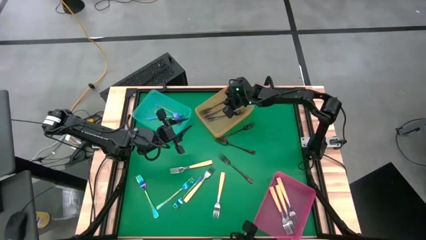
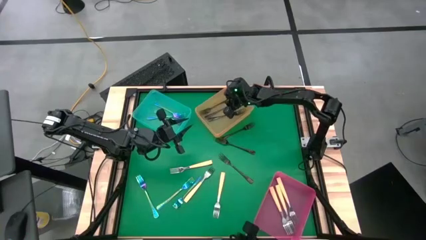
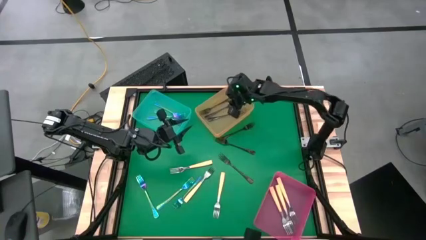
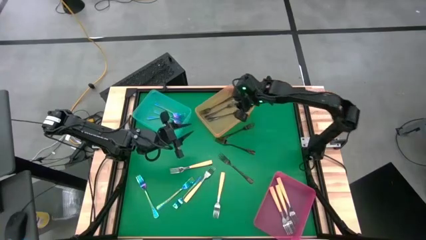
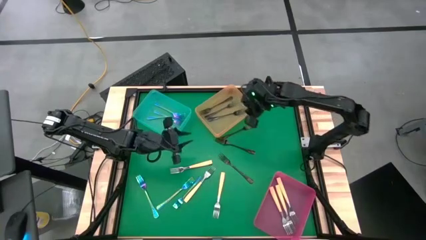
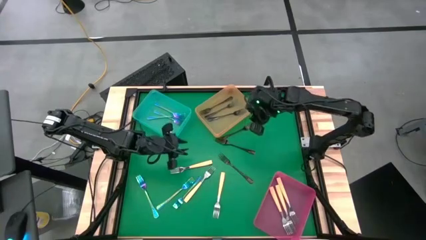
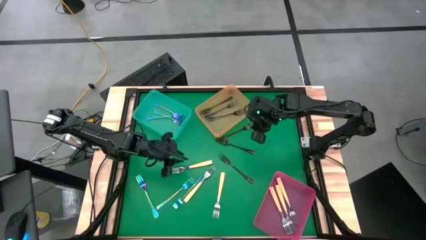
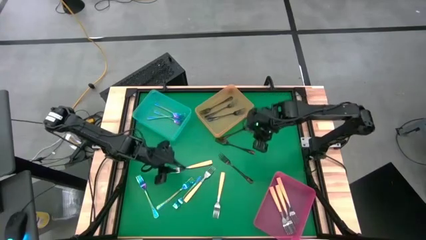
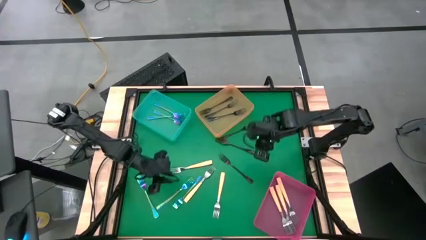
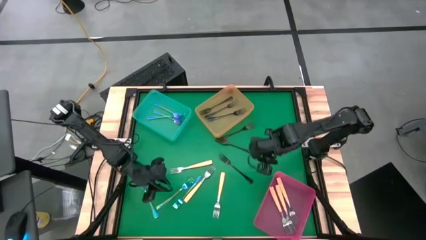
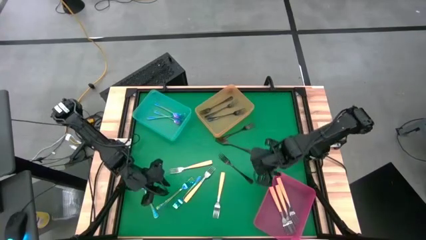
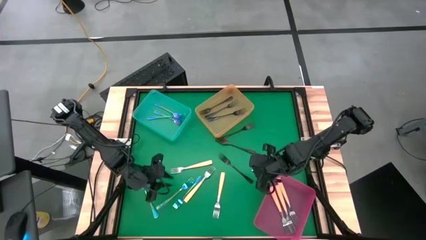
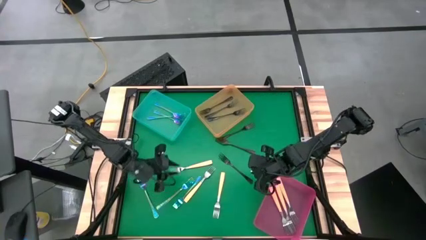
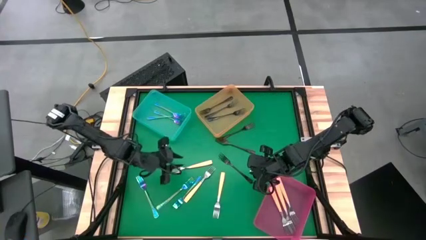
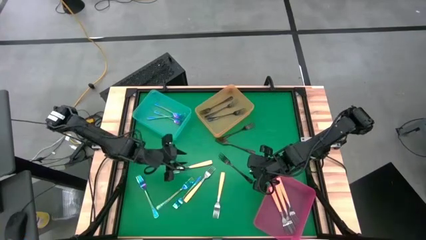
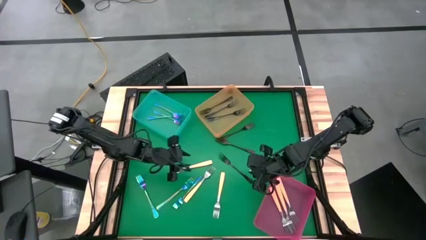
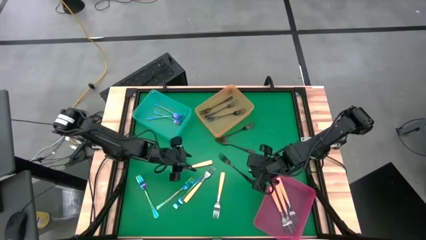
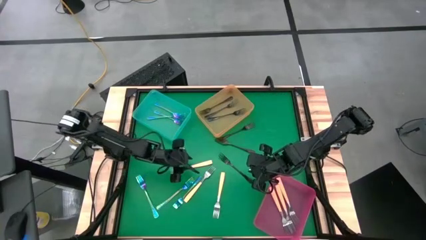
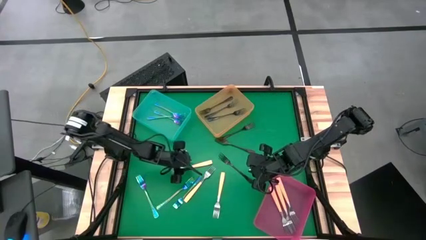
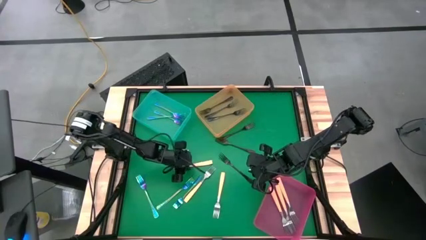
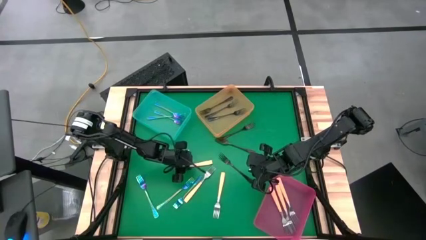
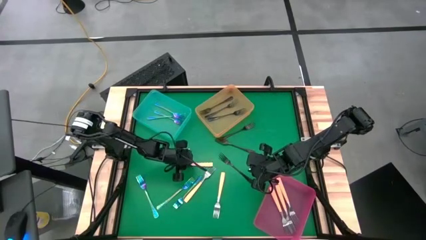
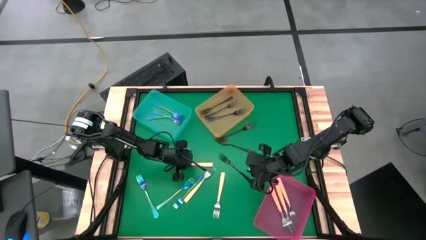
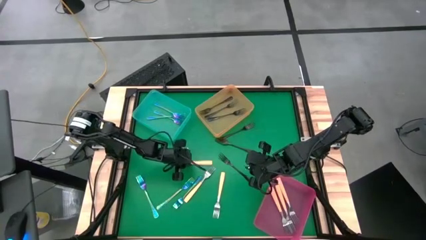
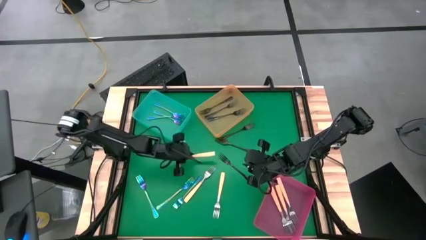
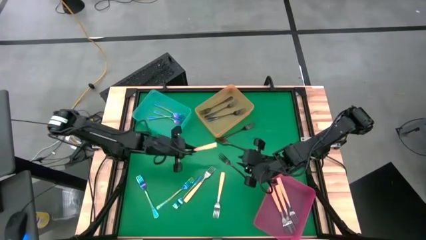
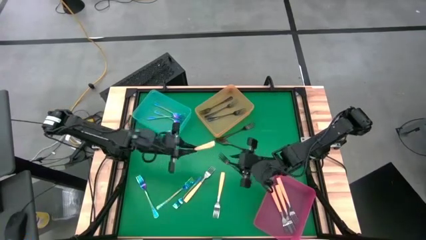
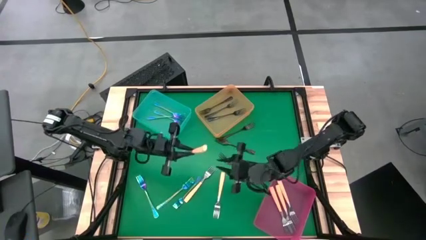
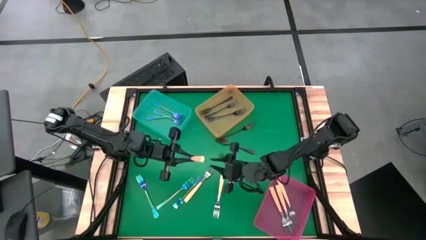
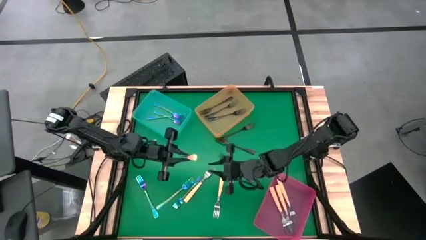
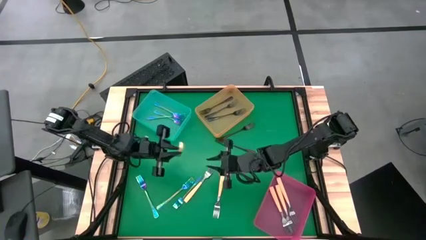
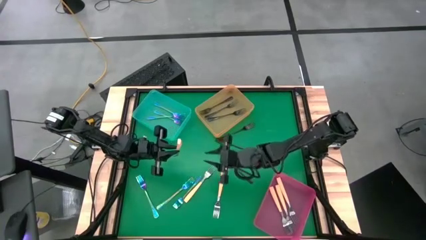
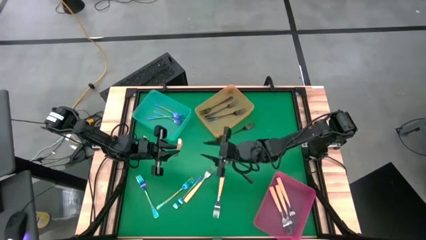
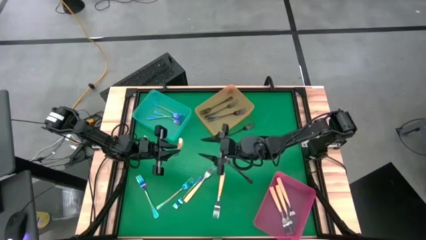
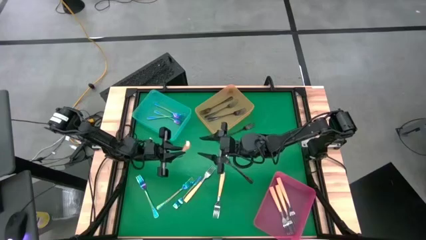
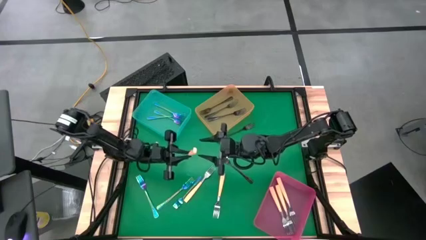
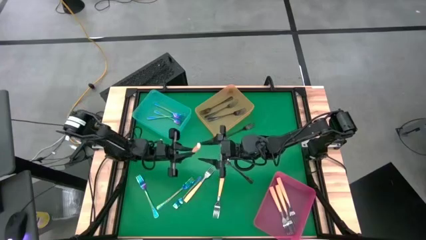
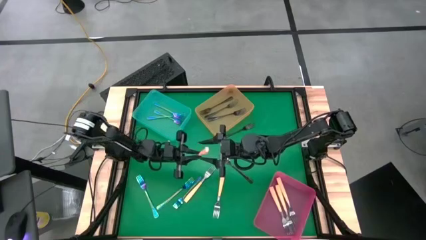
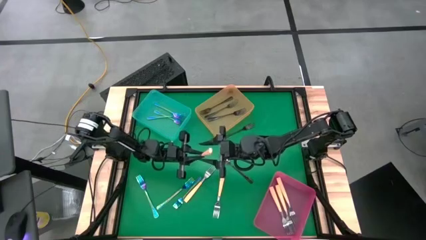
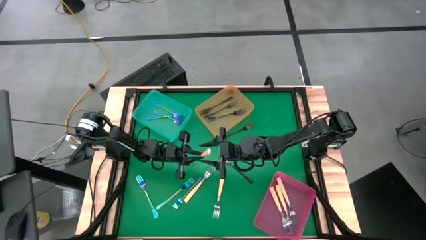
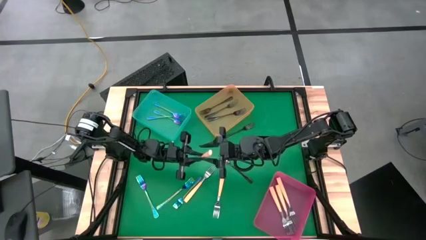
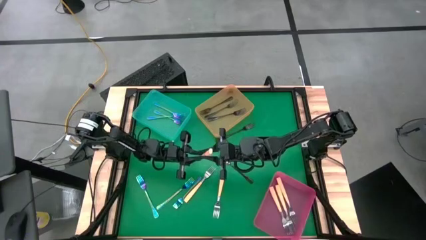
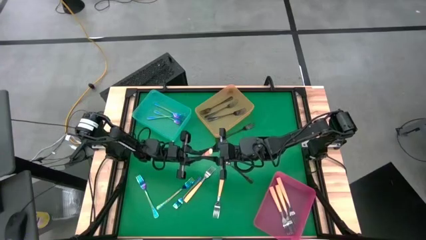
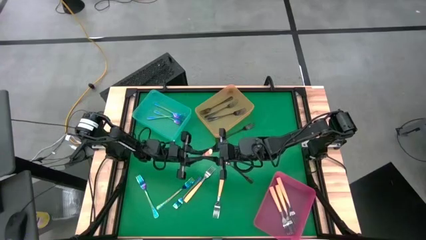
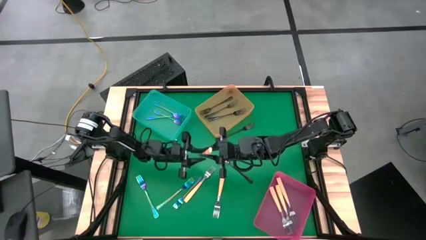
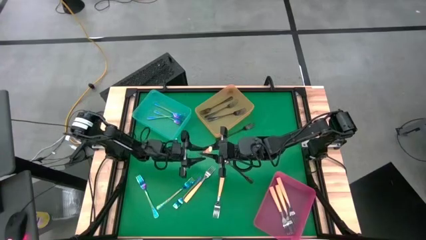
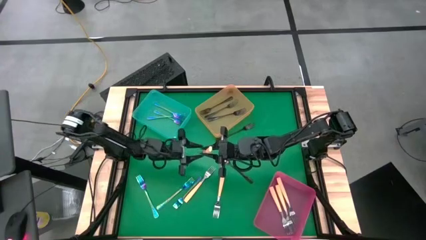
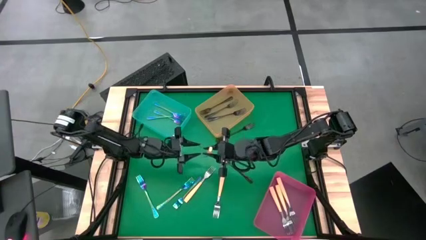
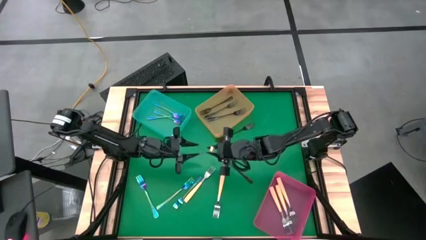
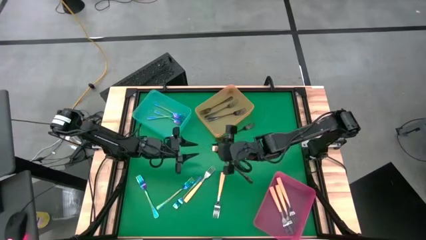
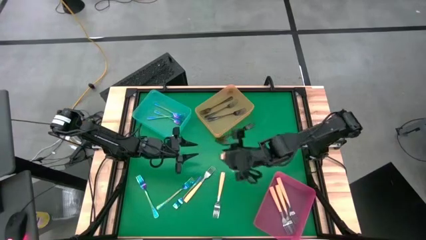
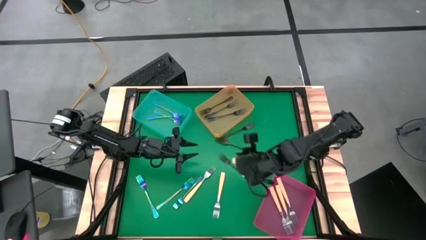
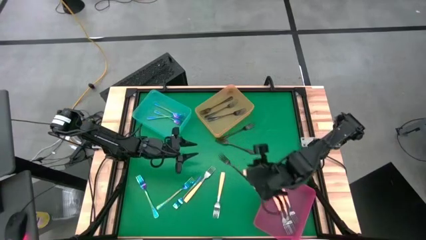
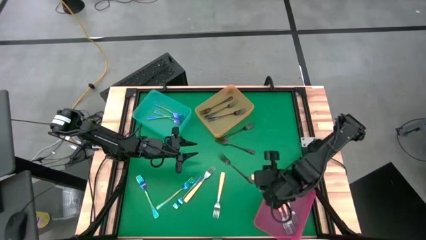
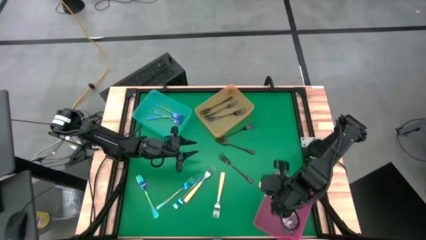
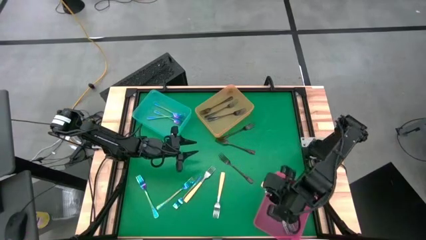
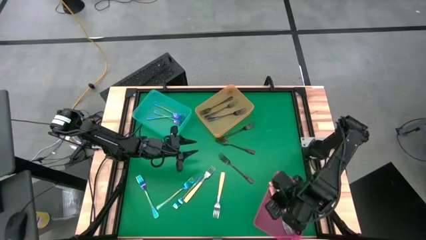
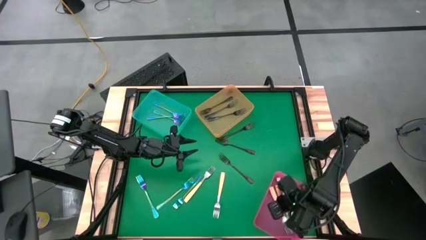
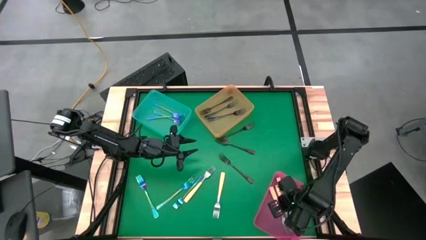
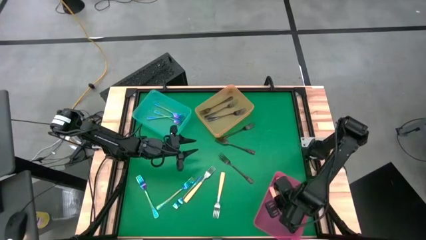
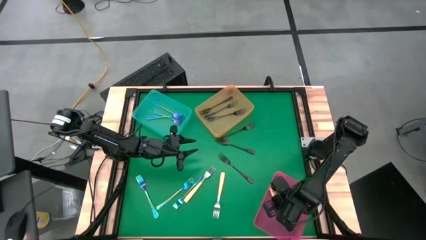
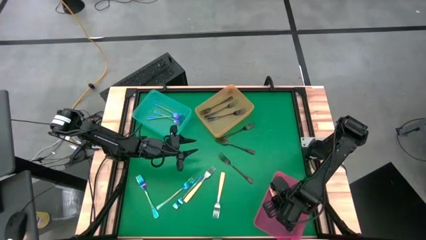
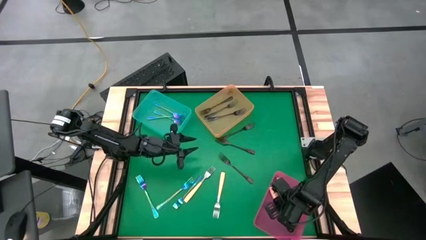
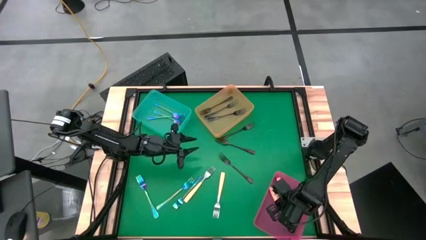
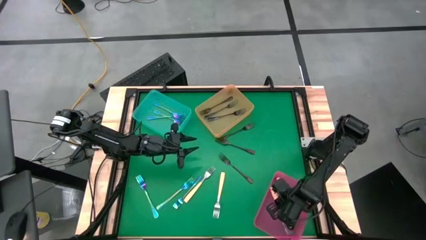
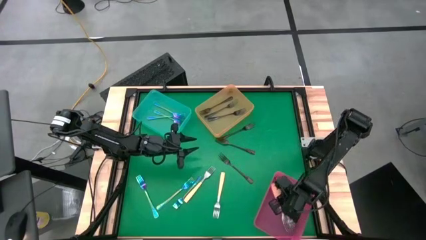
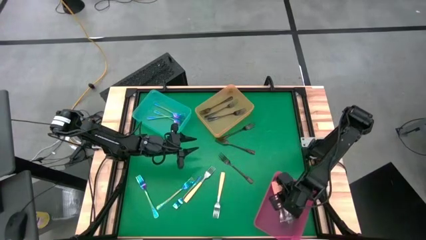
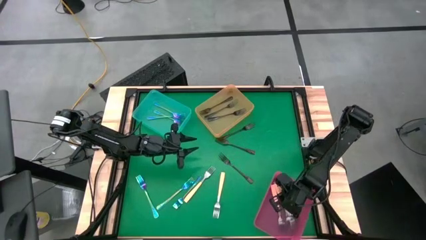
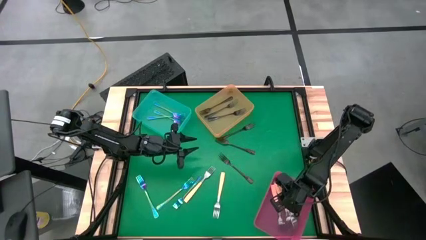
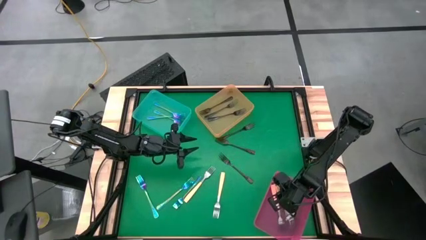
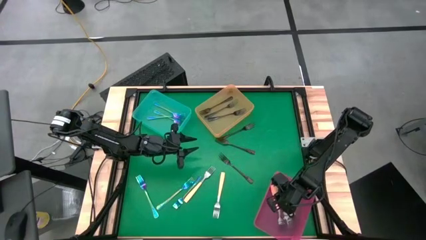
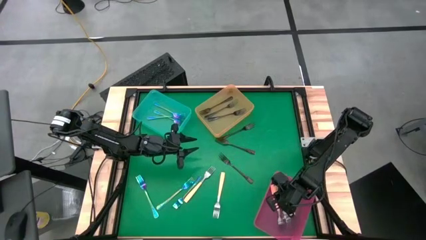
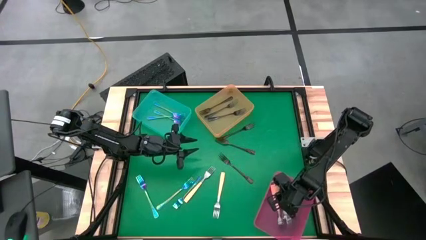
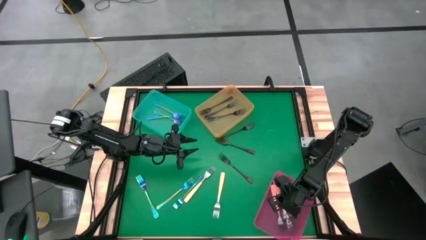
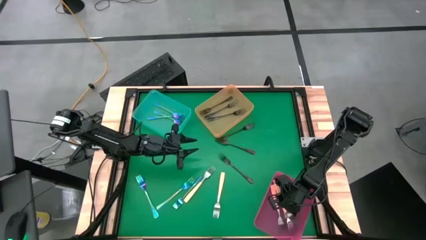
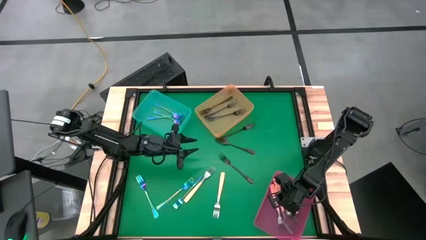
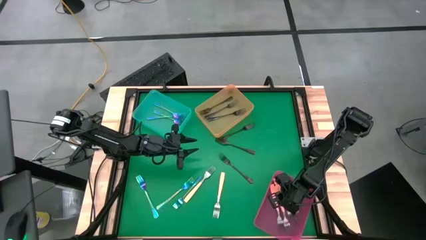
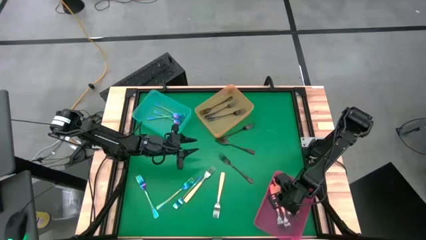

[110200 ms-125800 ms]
Task: Sort silverware by color (type)
Put the yellow fork into the pink bin

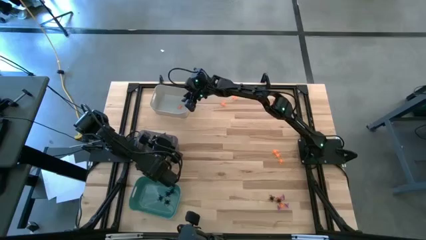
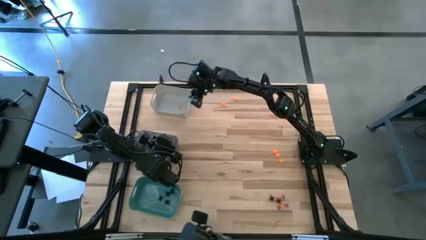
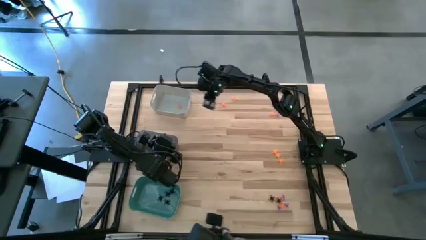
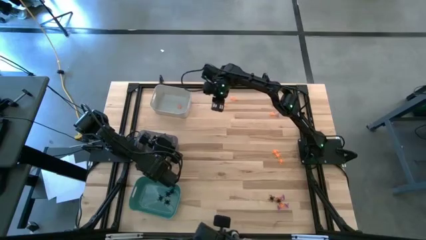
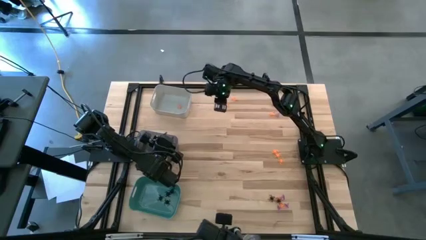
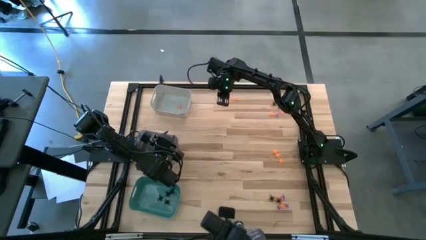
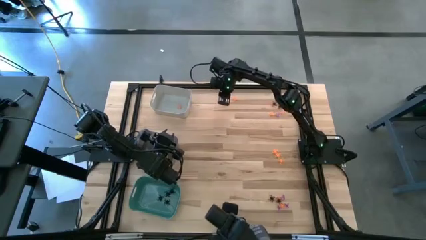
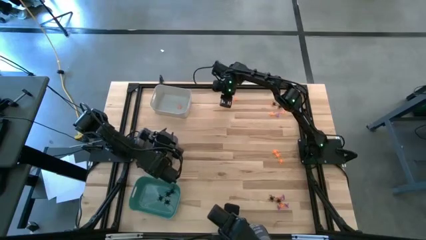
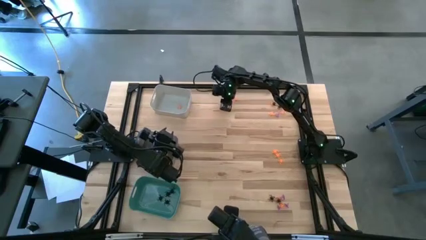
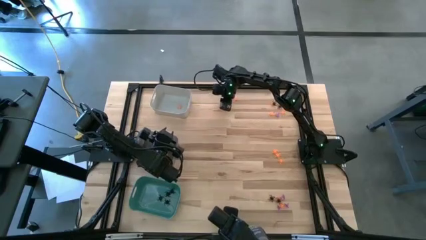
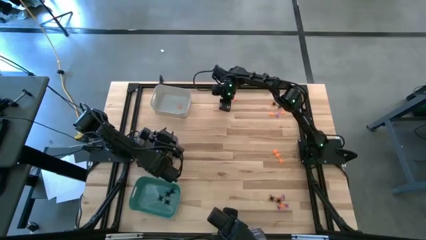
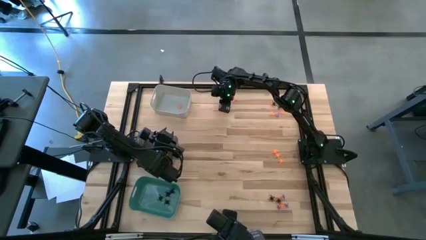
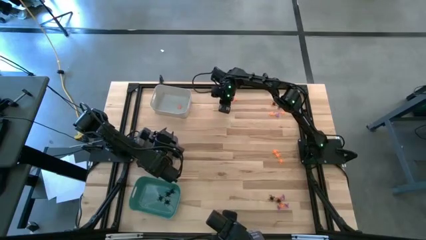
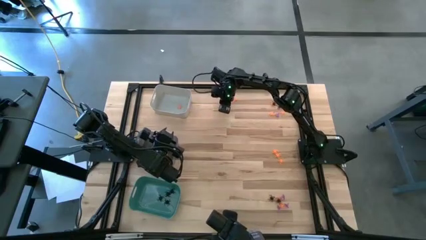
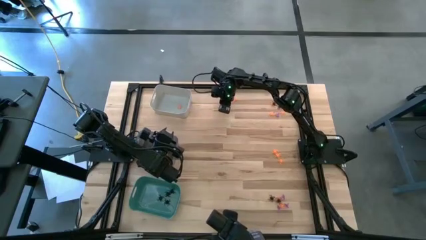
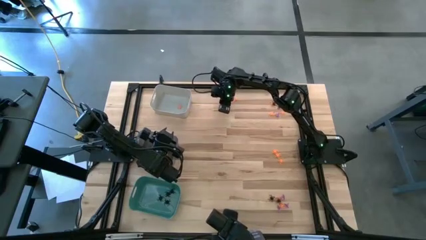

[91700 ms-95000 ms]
Task: Sort Halloween decoration
Put the top center orange spider into the gray bin
